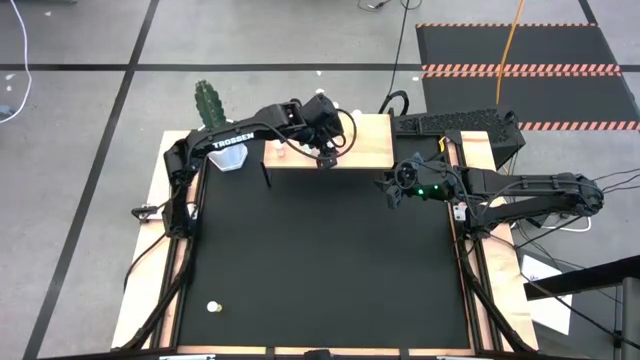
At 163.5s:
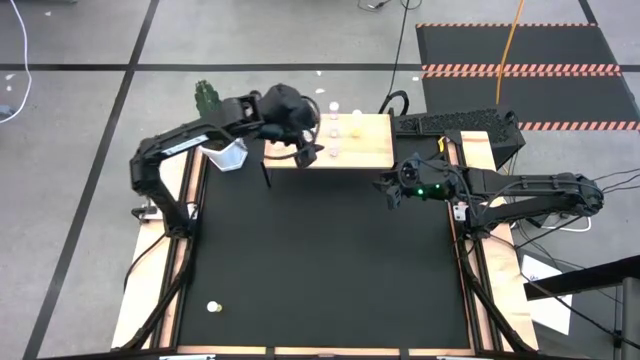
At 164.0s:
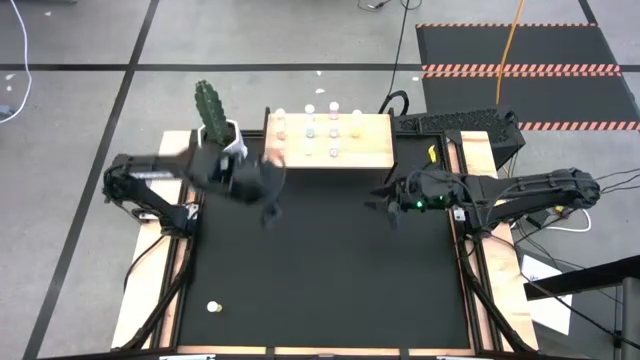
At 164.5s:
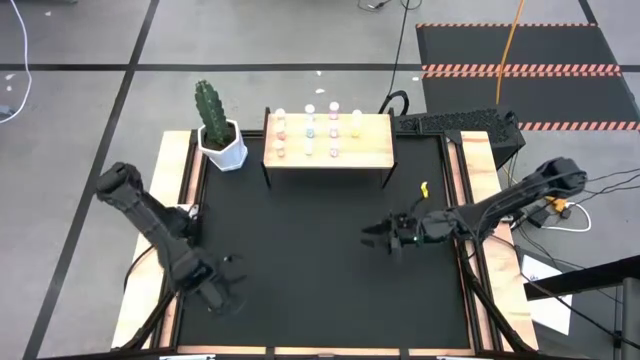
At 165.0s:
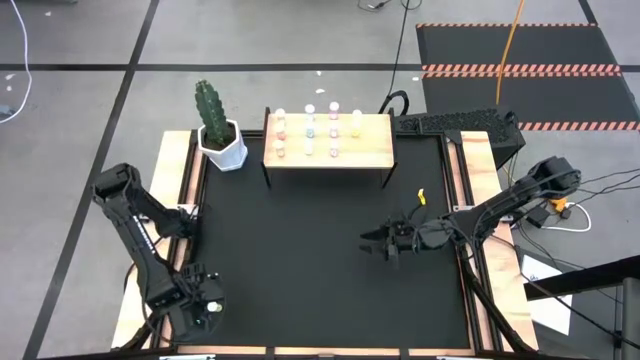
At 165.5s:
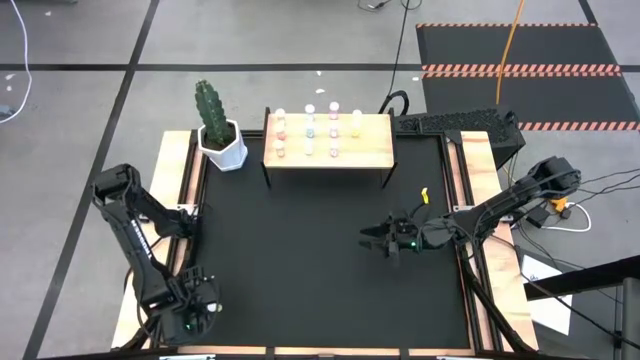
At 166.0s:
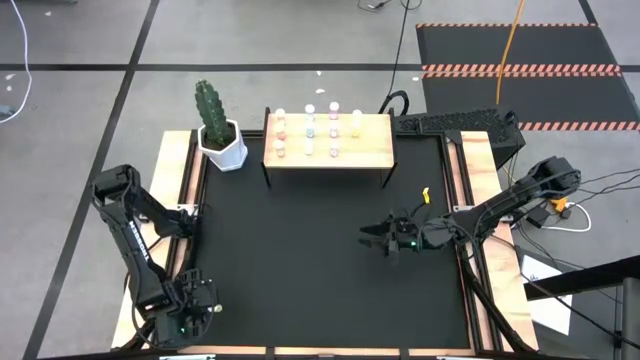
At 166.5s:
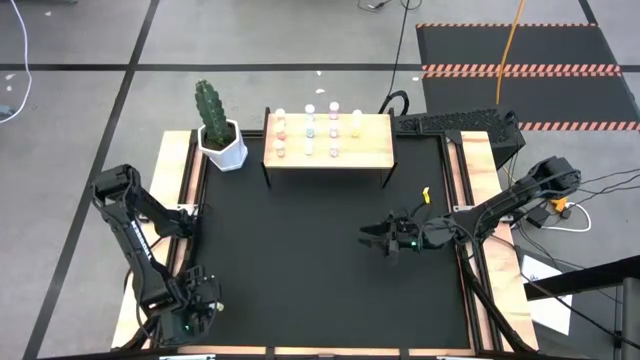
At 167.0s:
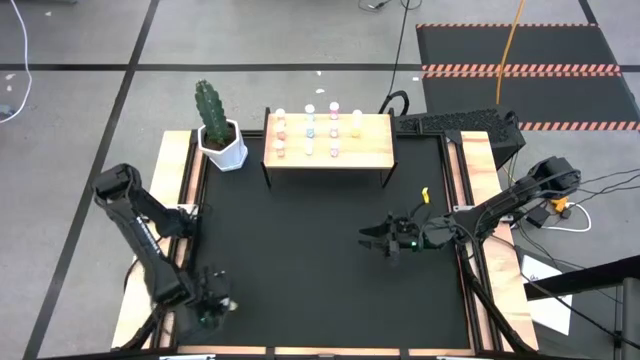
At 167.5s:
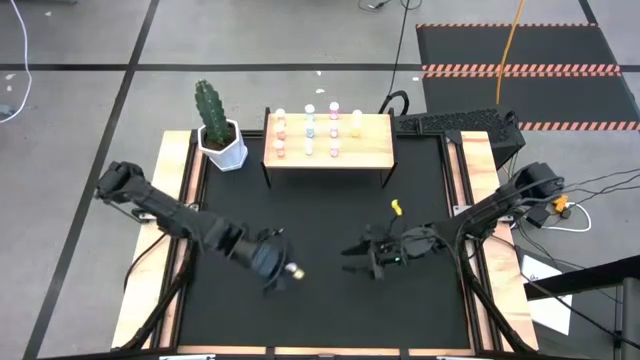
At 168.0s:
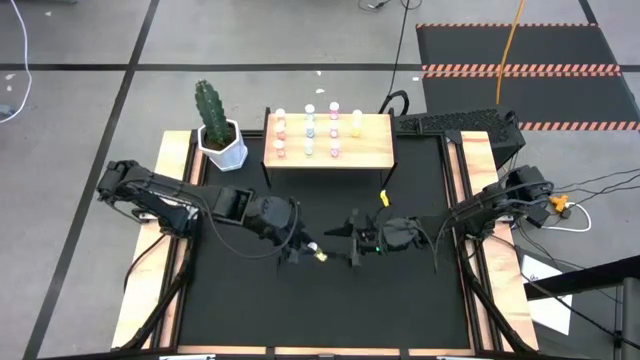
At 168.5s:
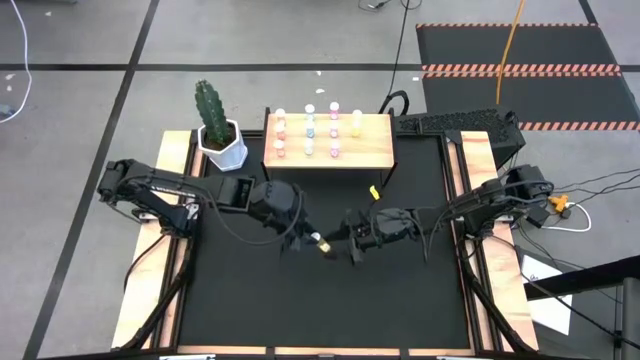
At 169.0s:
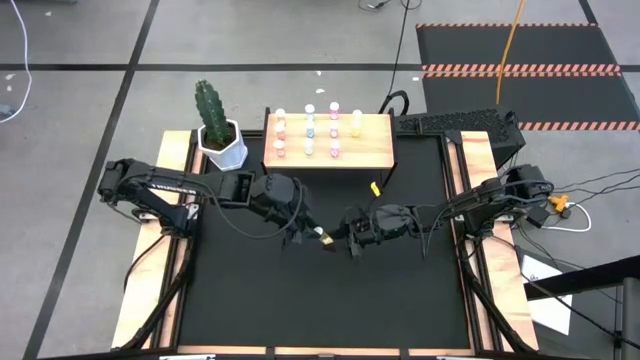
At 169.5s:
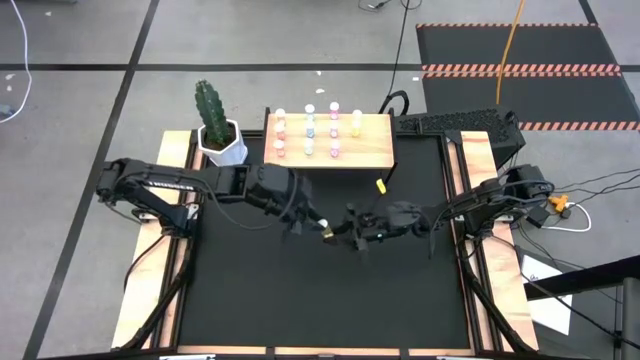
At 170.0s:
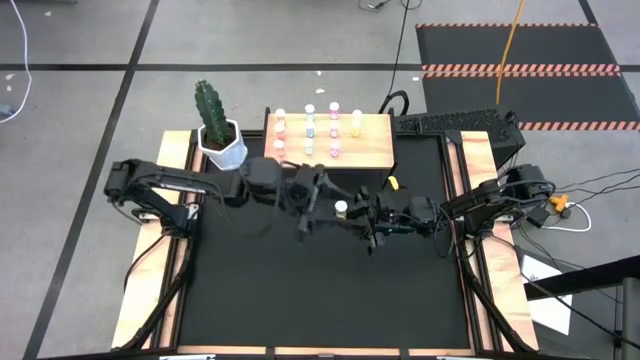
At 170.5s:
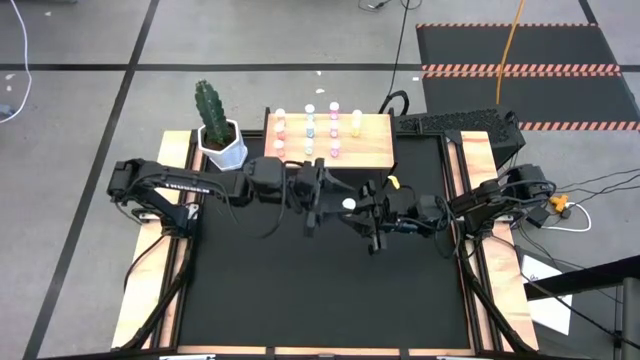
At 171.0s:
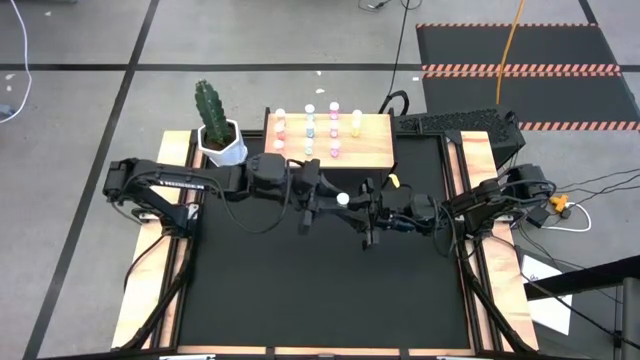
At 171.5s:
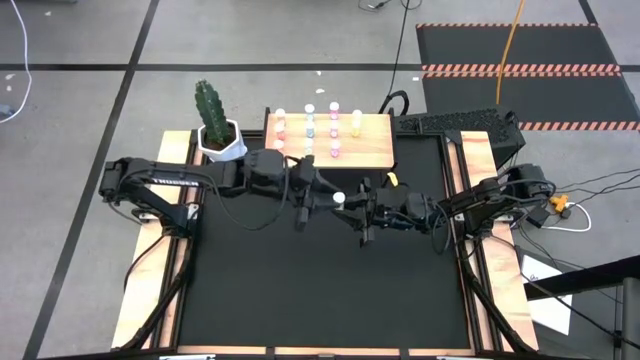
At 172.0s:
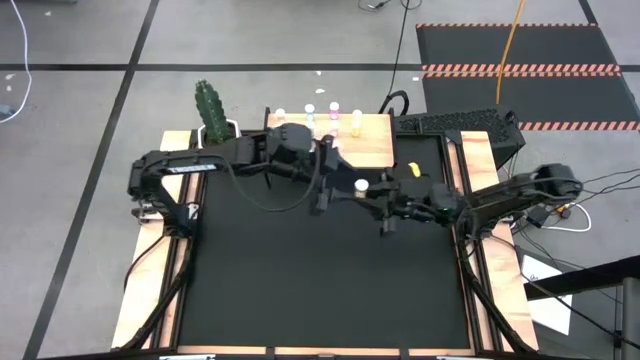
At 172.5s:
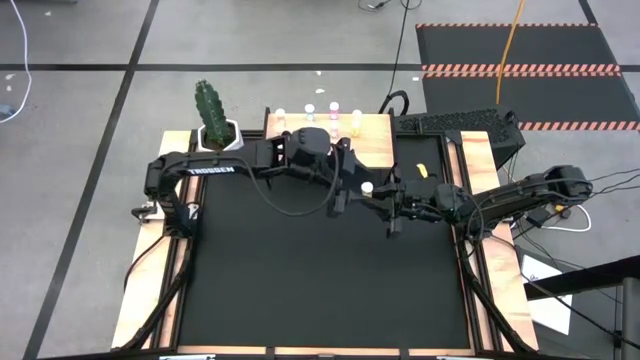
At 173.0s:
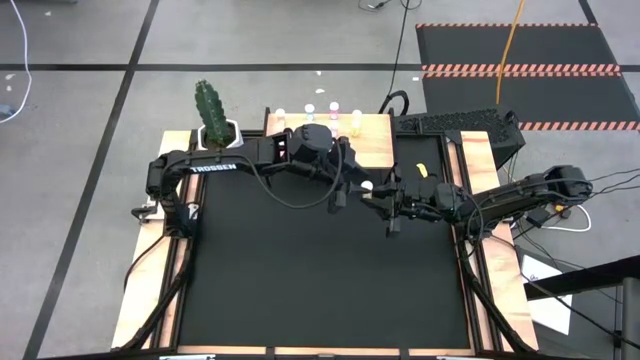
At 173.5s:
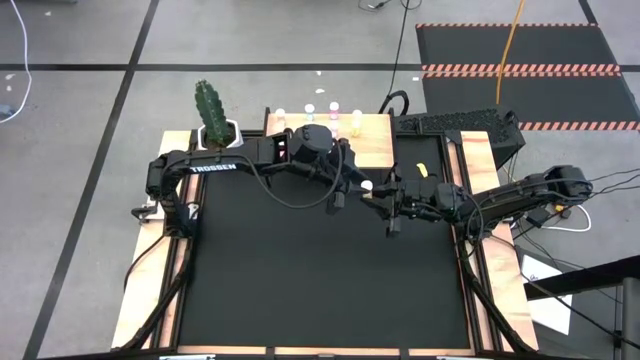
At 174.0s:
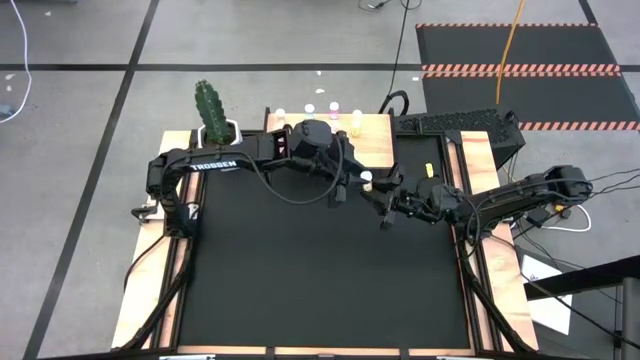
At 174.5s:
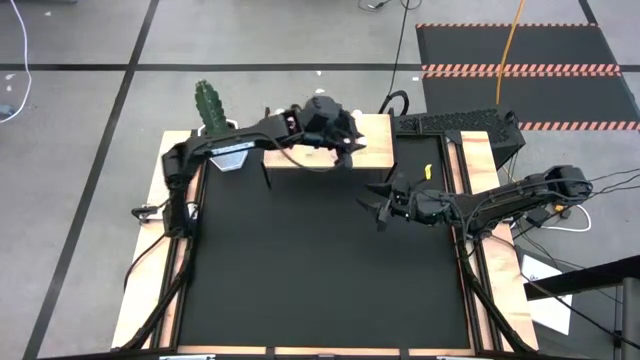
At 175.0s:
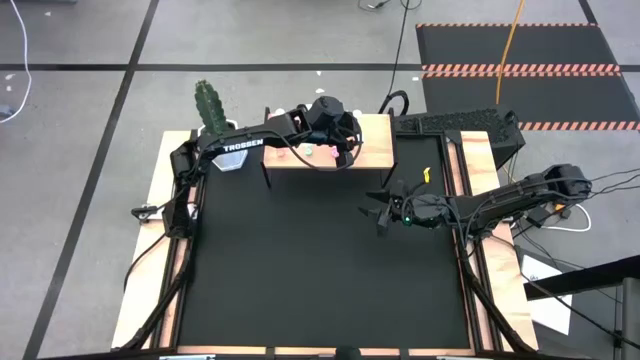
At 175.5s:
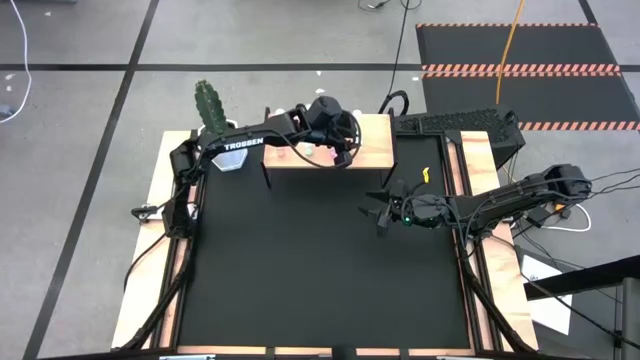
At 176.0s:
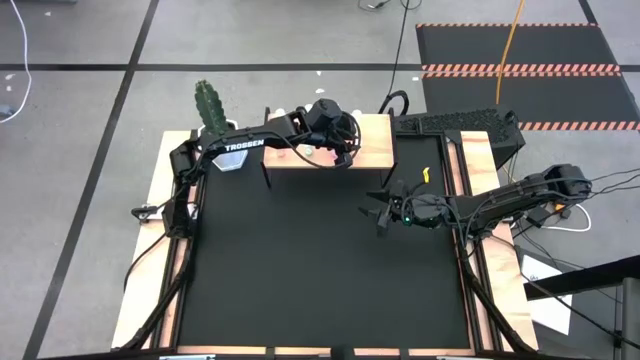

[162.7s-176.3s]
Task: Pick and place medicine bottles onto shelf by color
Put the yellow pill bottle aligned with the other yellow pill bottles on the shelf

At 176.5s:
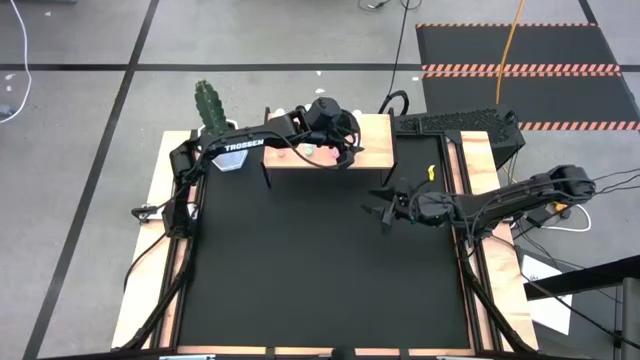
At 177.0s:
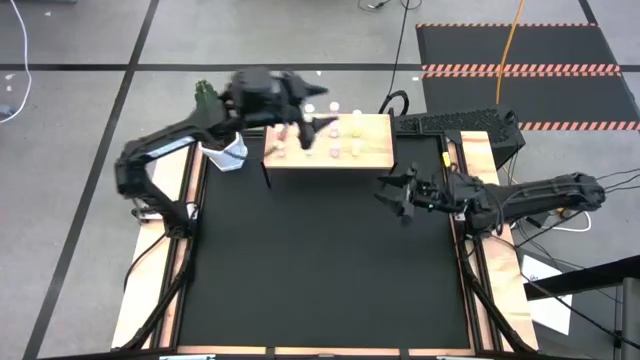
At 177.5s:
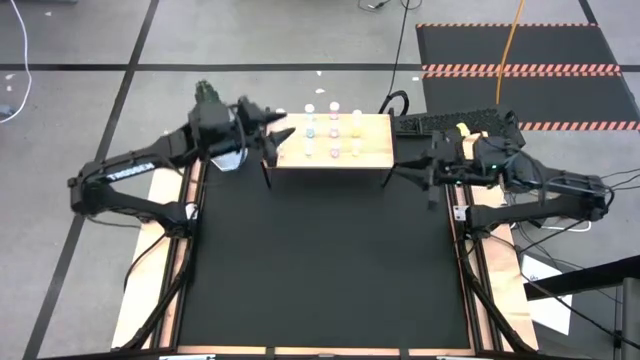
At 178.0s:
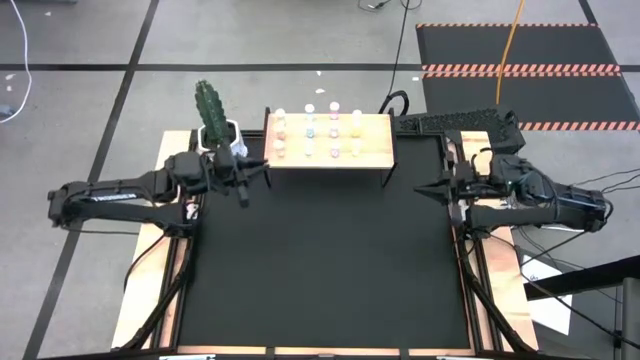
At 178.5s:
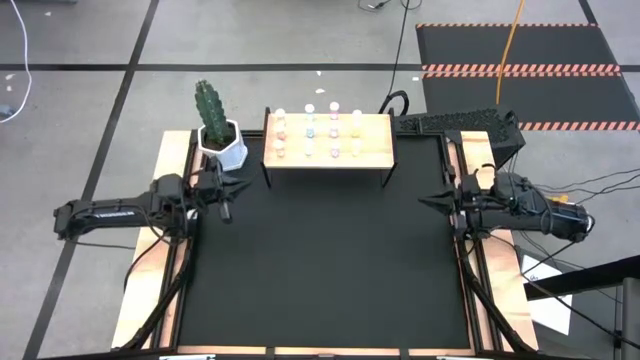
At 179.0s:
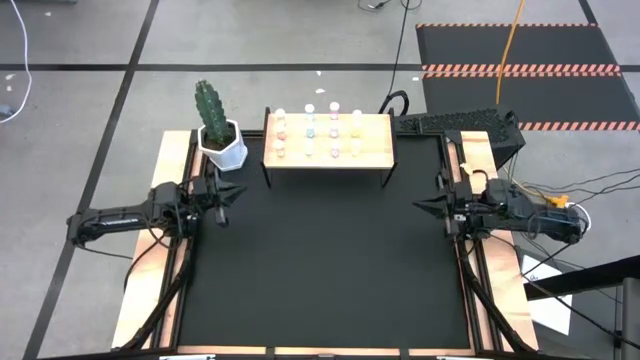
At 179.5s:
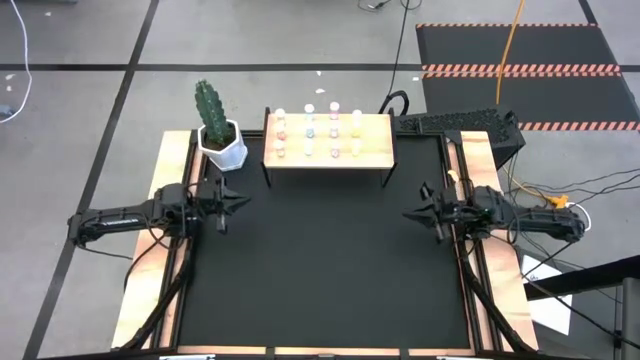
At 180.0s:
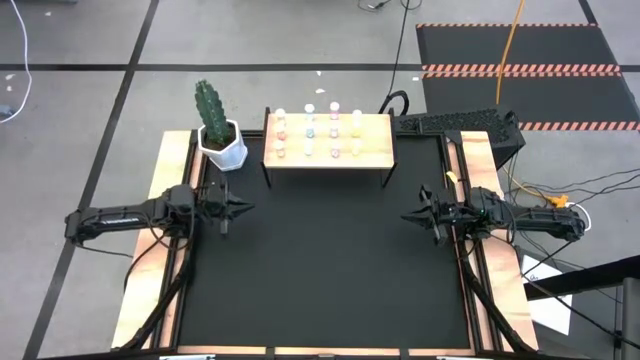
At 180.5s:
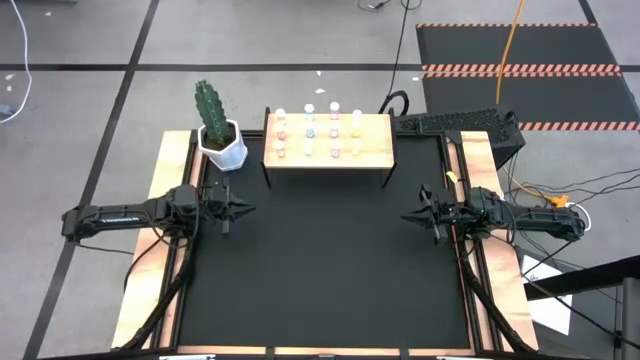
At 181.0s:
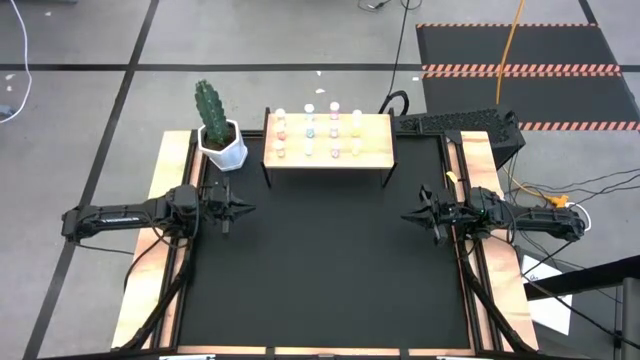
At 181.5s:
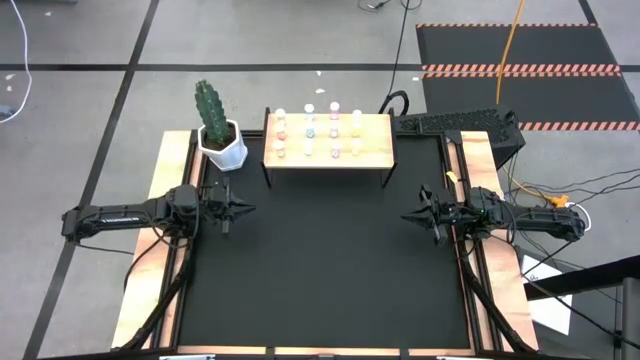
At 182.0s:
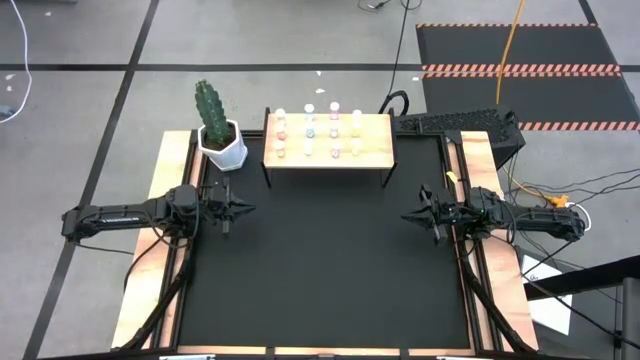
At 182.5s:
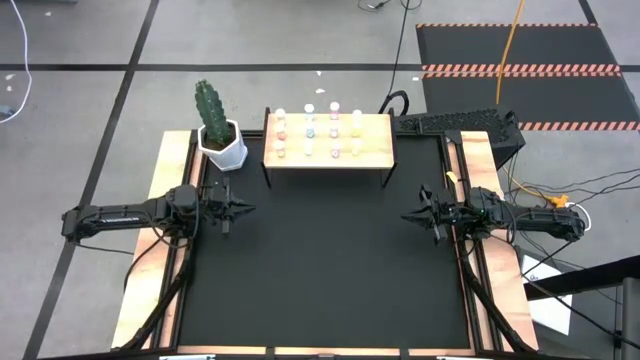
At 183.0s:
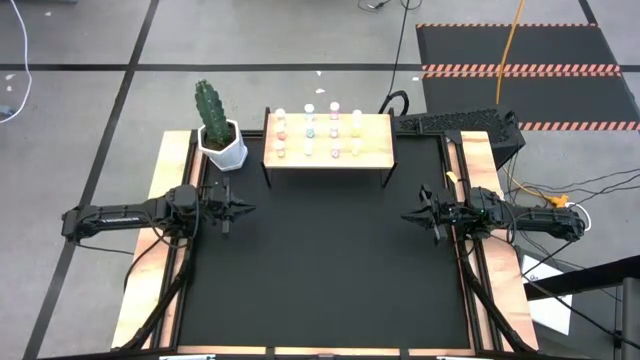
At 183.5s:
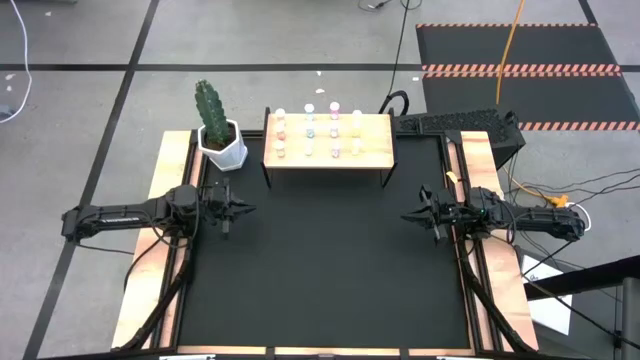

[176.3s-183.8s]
Return to Home Position
